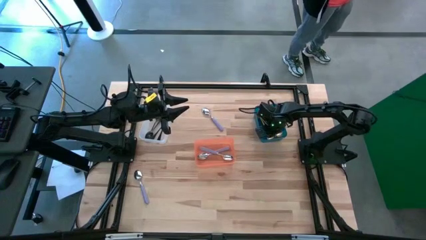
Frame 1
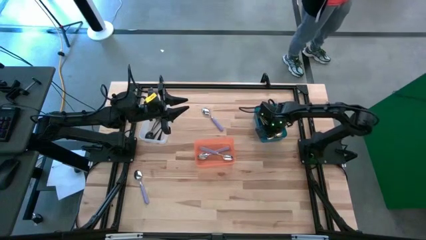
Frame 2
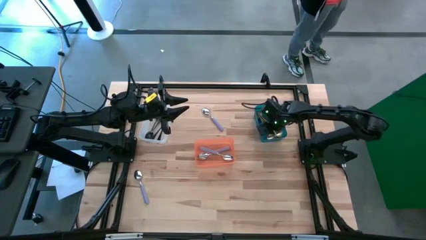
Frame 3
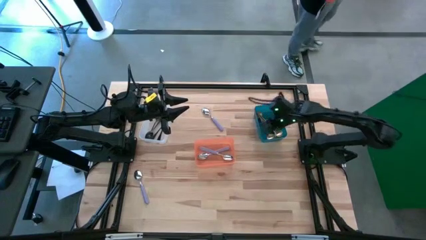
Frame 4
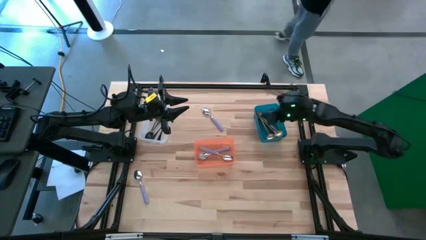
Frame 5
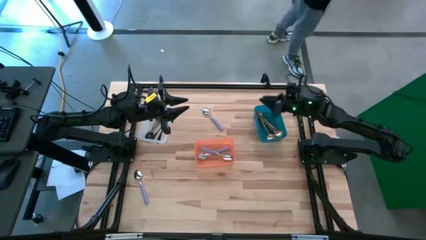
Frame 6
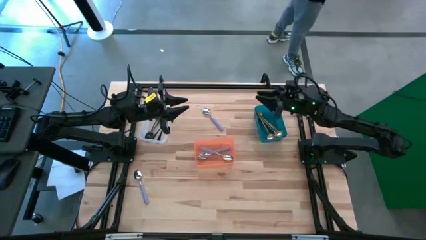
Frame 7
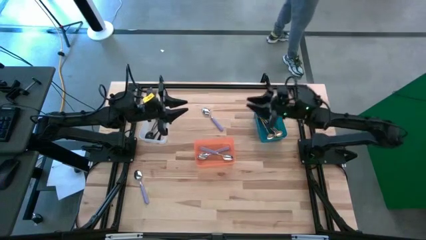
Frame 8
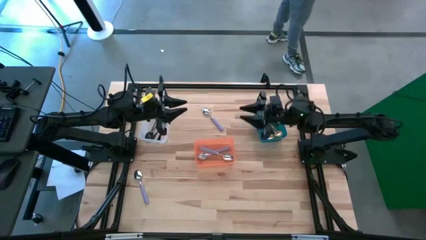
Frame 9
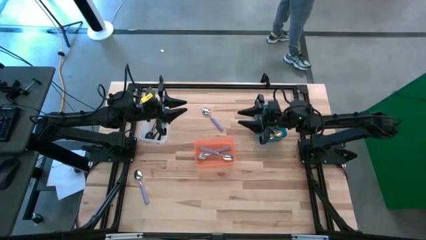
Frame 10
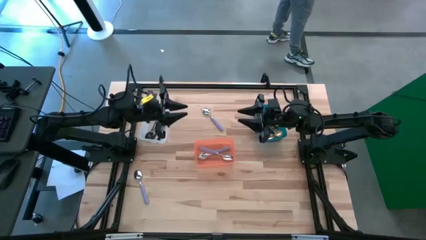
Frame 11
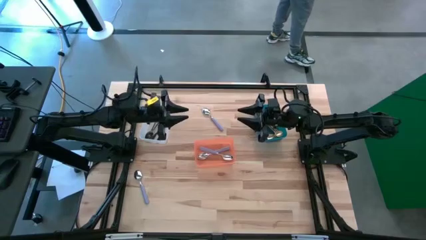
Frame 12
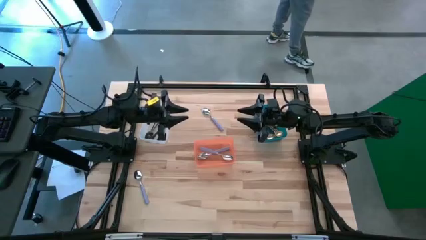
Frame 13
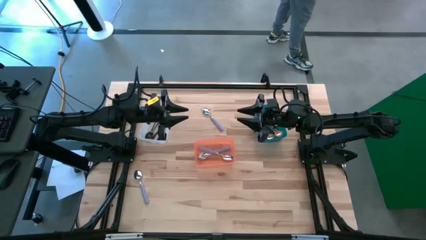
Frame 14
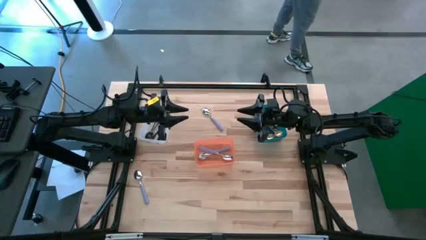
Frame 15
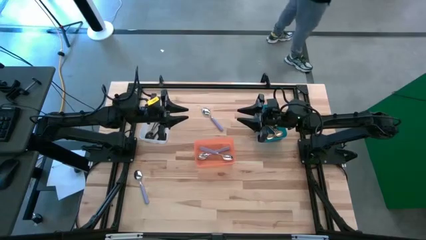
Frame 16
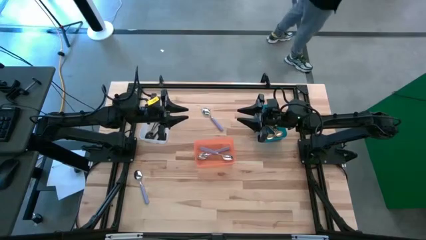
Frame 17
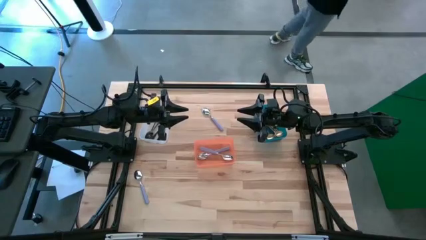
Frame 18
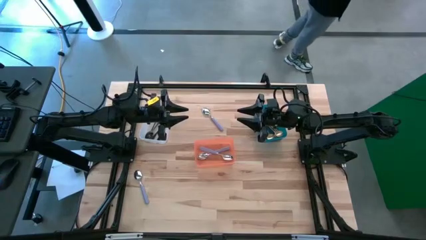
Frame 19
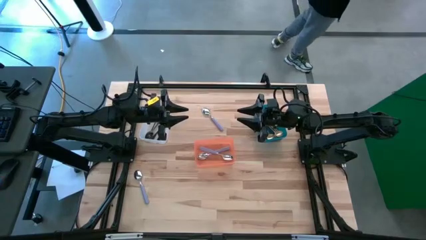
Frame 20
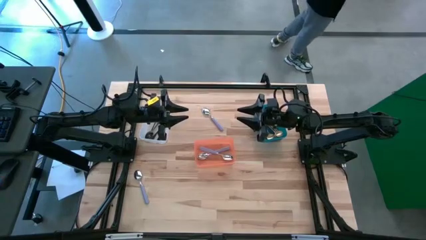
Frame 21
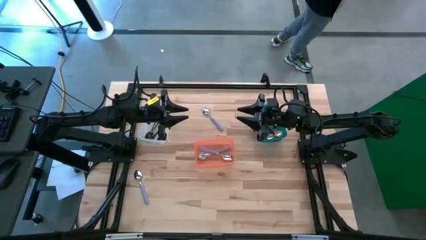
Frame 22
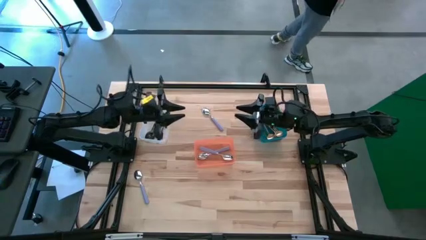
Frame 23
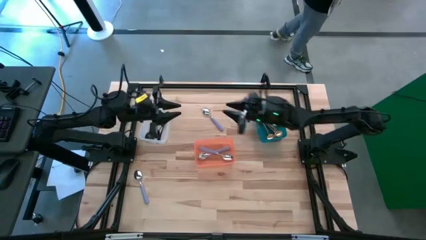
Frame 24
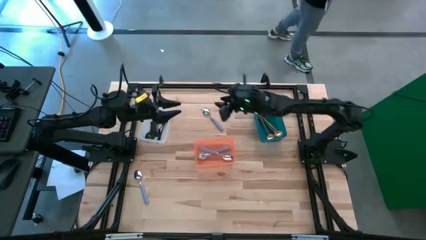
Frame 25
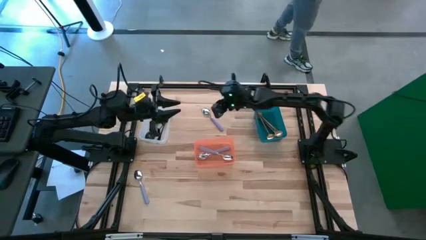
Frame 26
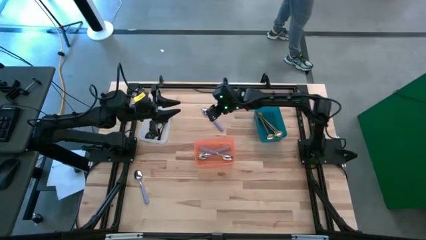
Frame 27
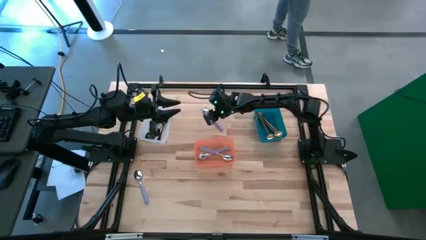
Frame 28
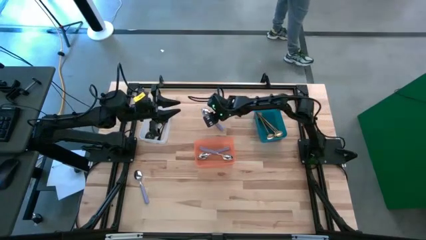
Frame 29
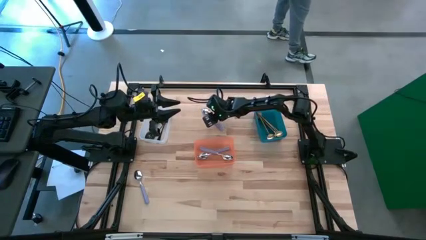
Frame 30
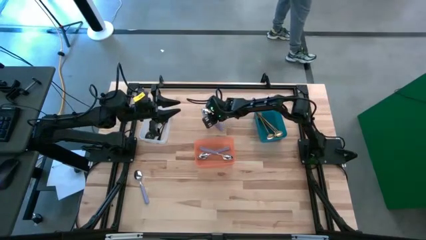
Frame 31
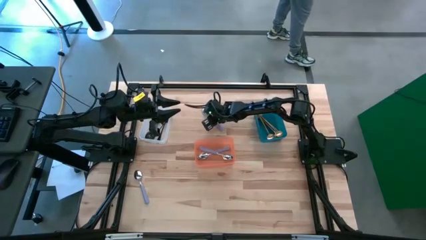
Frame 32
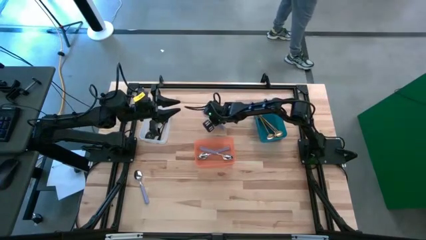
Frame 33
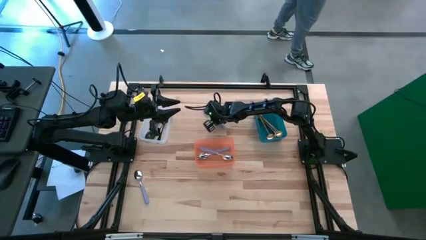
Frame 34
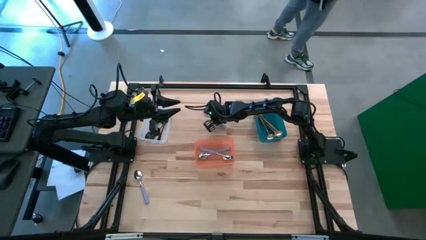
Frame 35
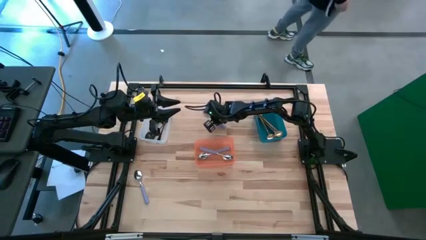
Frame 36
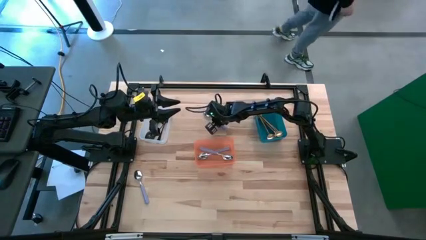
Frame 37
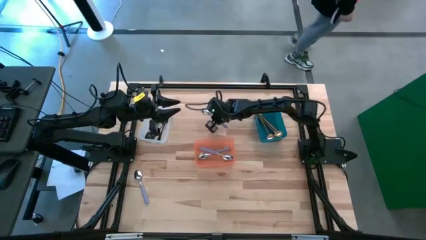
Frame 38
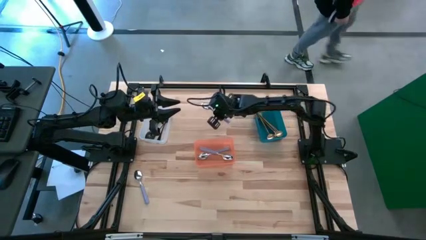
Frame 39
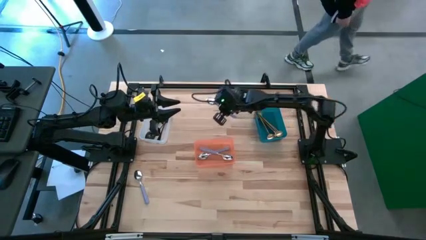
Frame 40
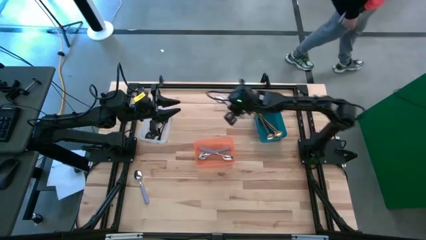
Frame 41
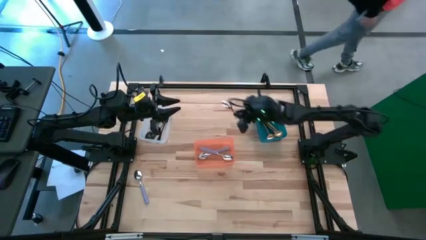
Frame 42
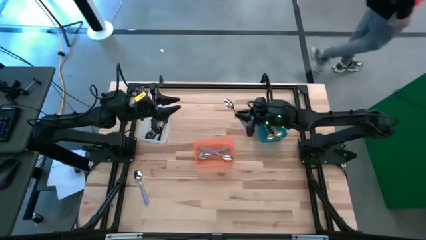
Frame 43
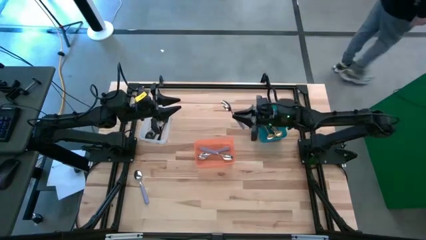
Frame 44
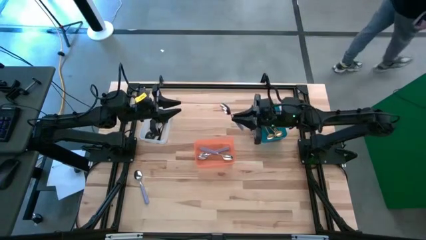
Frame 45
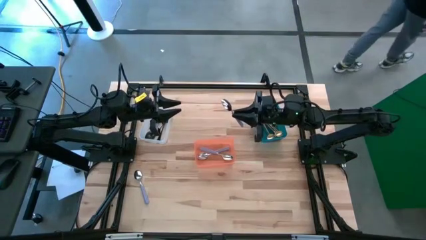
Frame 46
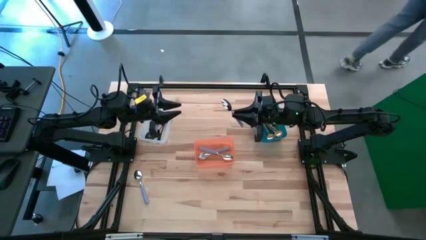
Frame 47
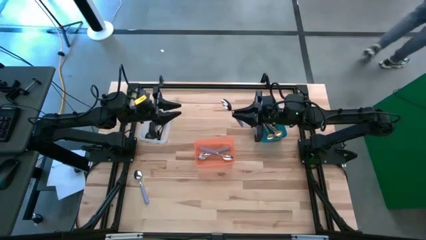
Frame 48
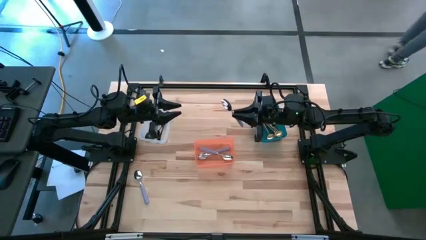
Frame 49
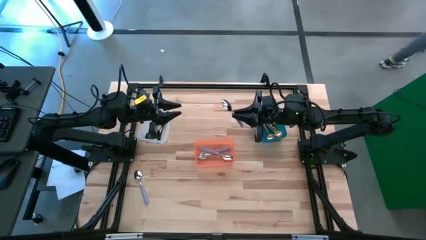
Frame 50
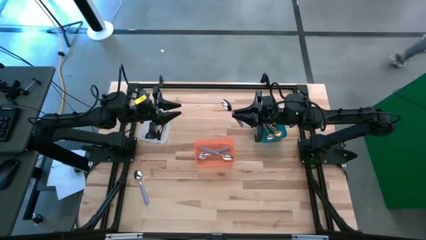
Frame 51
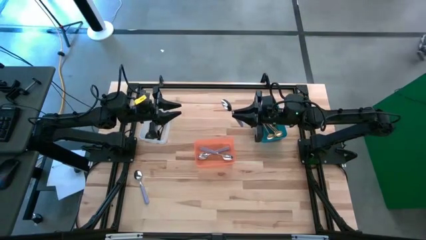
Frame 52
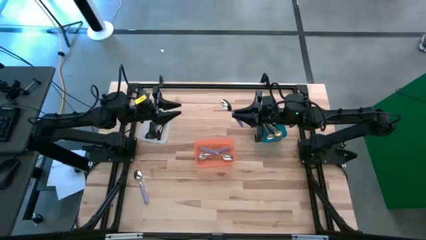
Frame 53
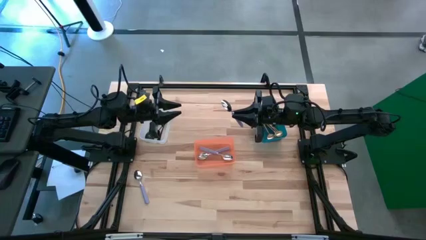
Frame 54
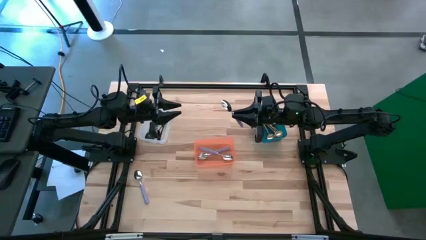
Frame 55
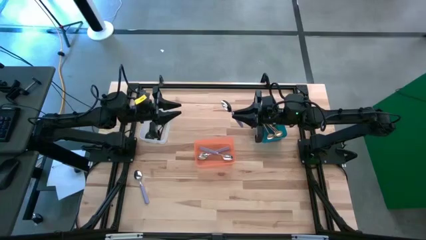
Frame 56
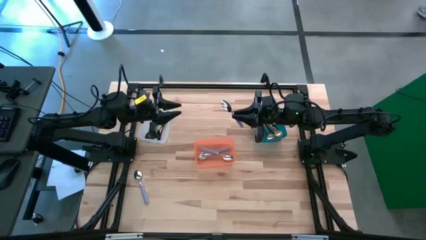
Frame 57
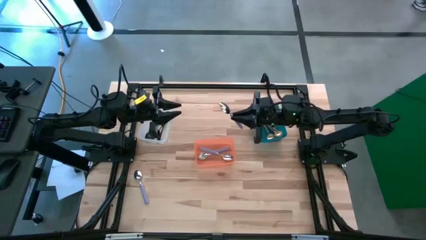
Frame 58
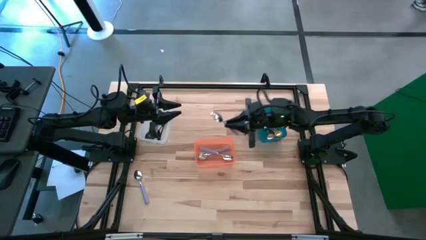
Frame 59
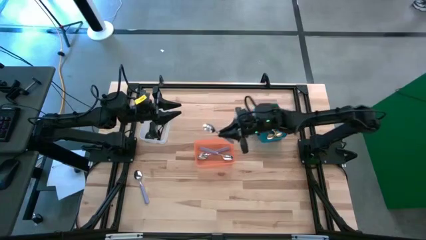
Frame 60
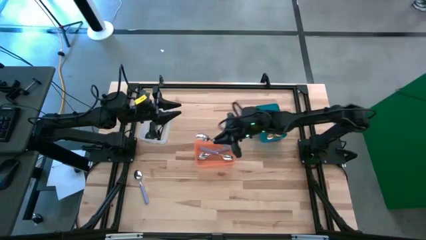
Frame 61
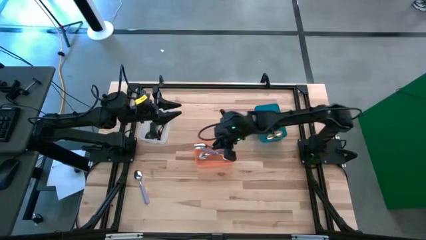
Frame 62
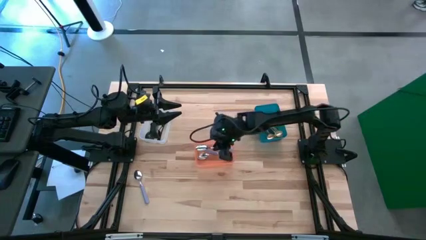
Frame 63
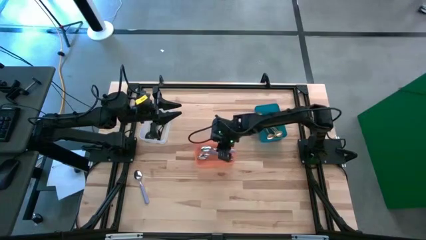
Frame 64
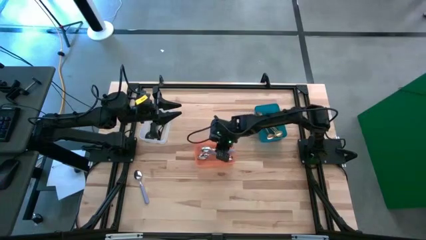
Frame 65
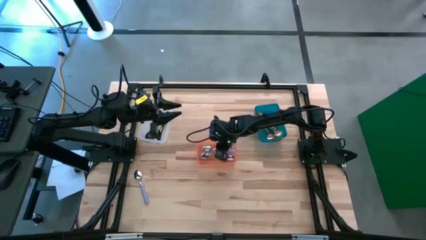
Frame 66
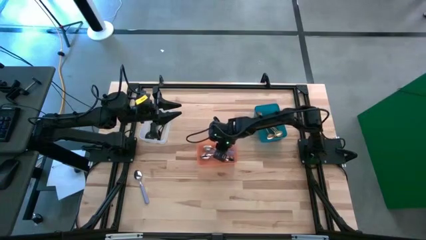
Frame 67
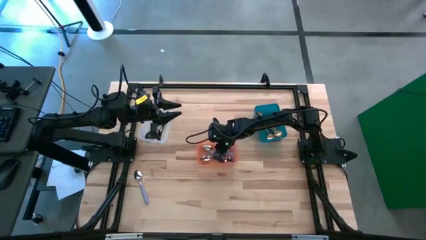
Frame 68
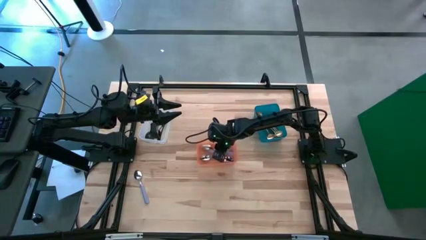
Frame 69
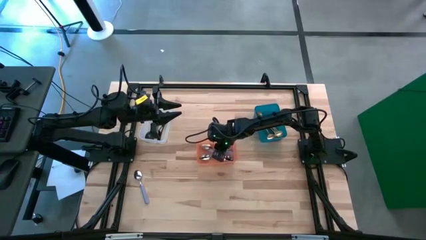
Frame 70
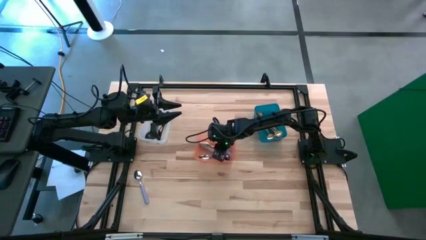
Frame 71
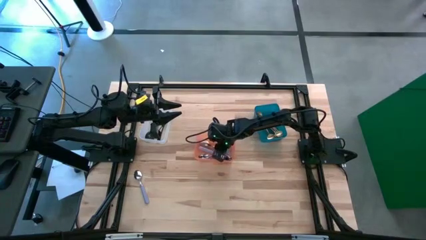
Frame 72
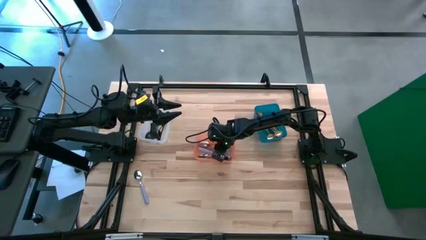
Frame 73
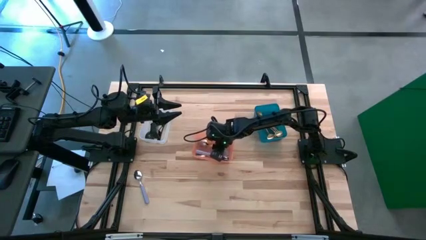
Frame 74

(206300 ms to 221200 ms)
Task: Sort silverware by color (type)
Put the top violet spoon into the orange bin

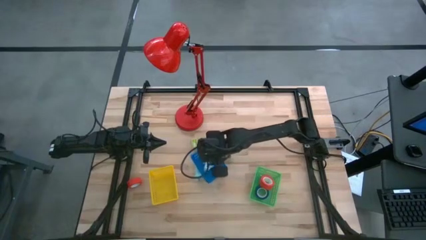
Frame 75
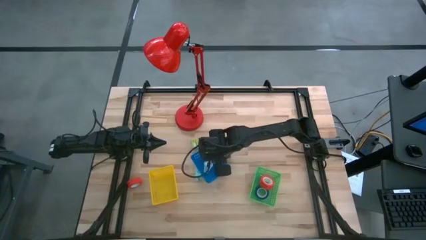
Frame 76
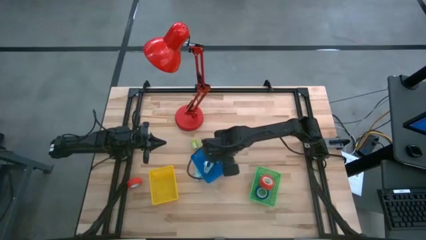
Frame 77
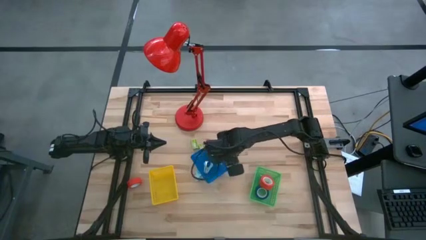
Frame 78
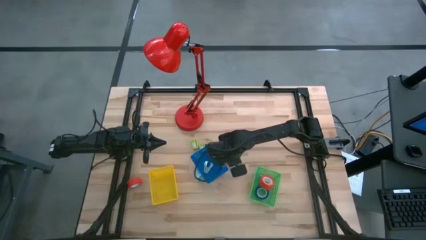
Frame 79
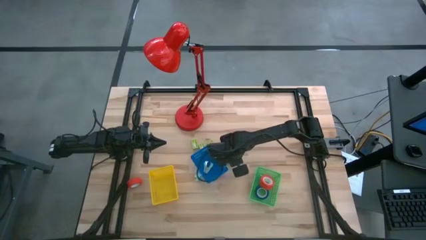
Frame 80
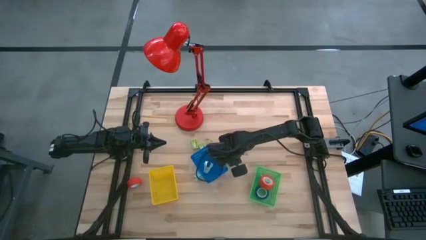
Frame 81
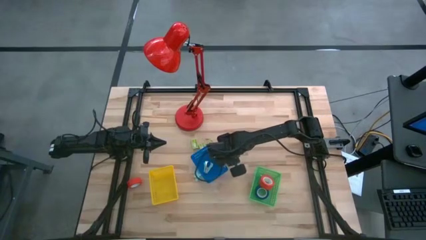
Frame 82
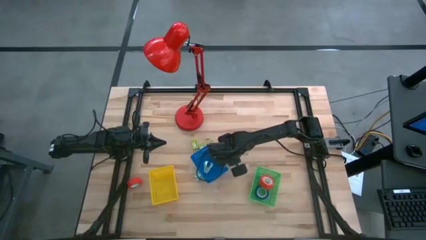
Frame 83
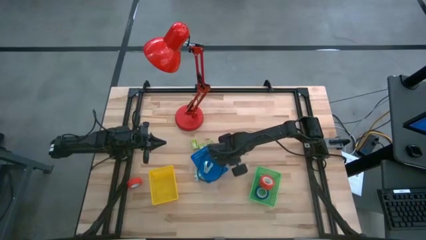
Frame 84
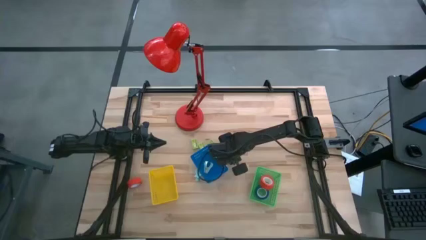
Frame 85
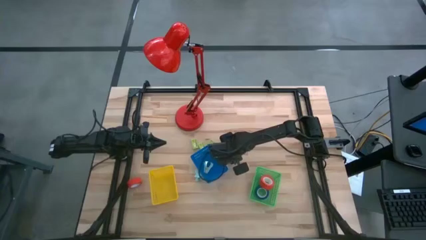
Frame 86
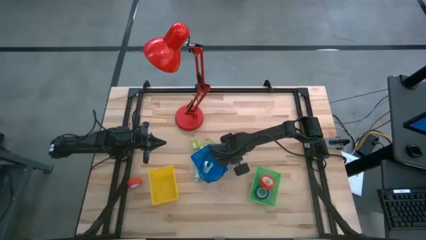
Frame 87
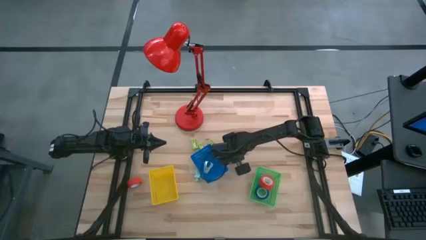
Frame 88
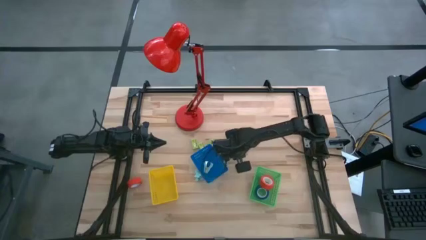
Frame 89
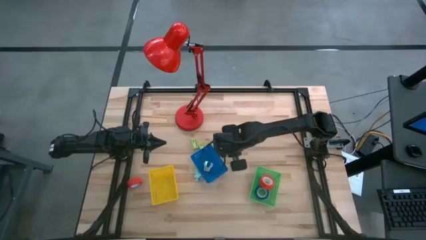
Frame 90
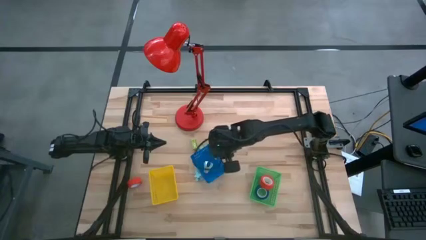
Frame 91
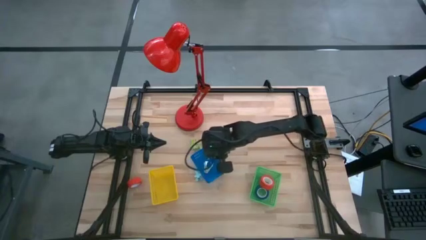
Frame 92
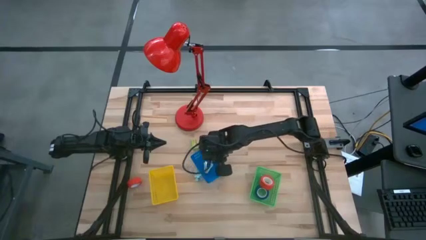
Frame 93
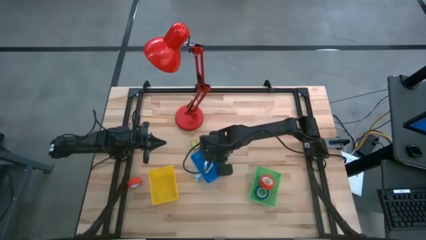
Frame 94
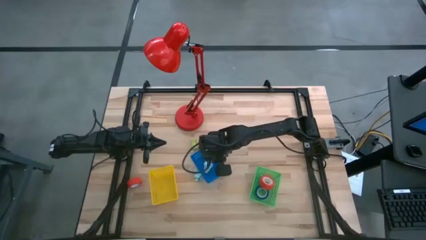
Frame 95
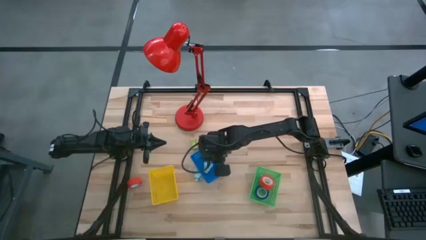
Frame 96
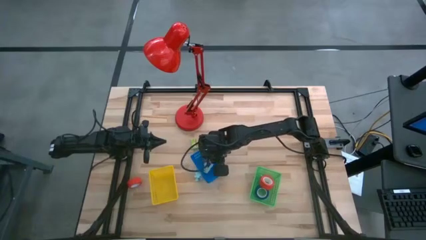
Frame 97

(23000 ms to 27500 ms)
Task: Pick and place Stapler, Stapler remover, tape
Put the black staple remover into the blue bin
